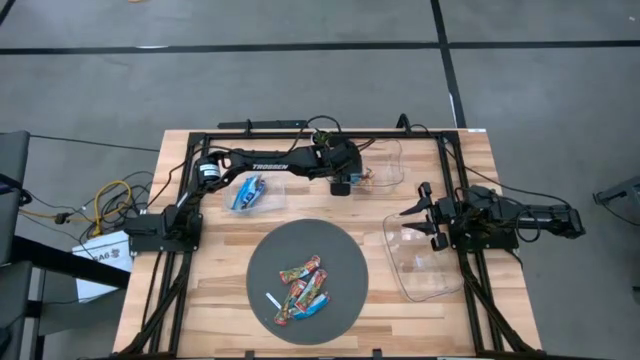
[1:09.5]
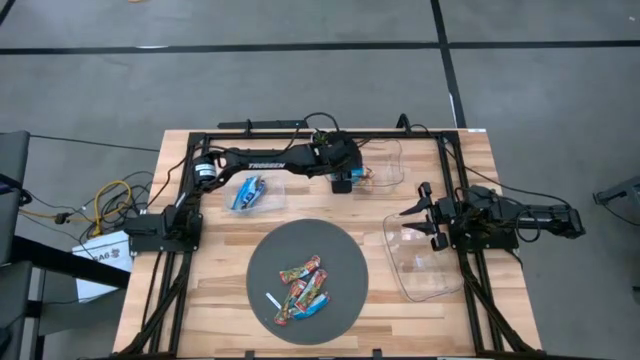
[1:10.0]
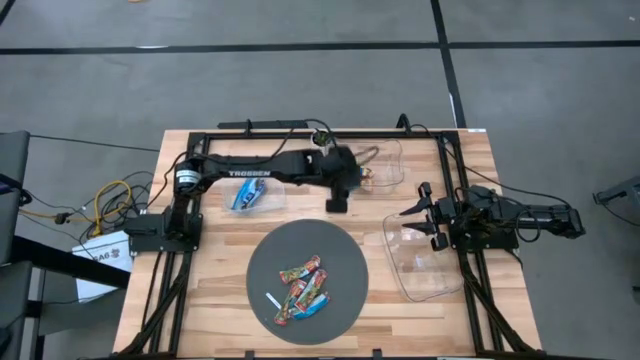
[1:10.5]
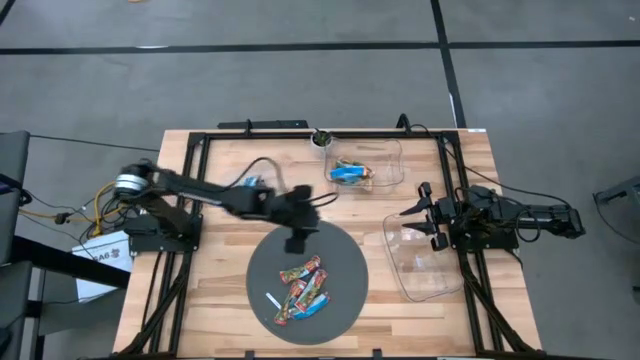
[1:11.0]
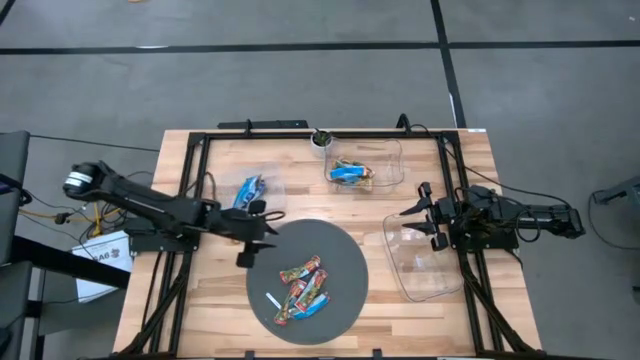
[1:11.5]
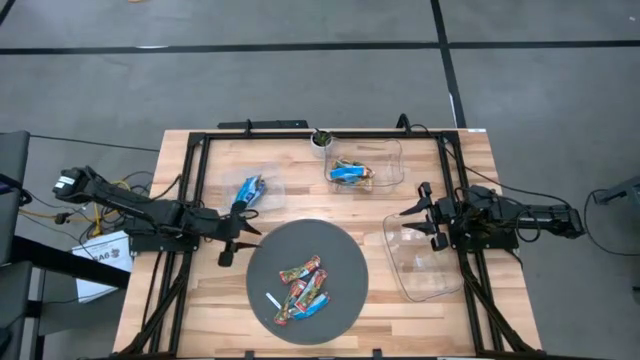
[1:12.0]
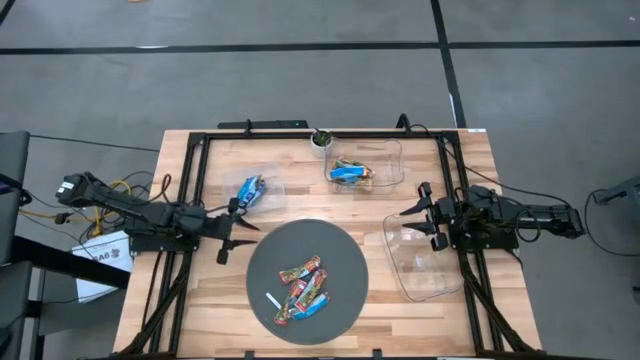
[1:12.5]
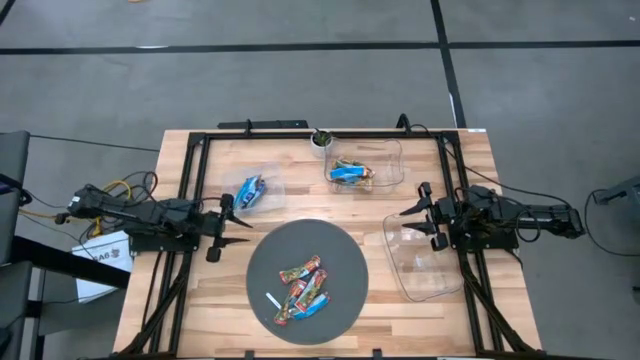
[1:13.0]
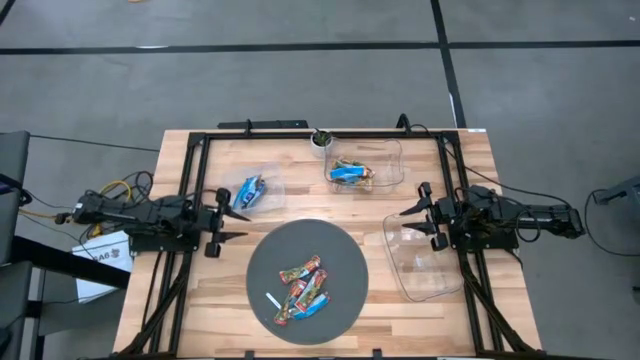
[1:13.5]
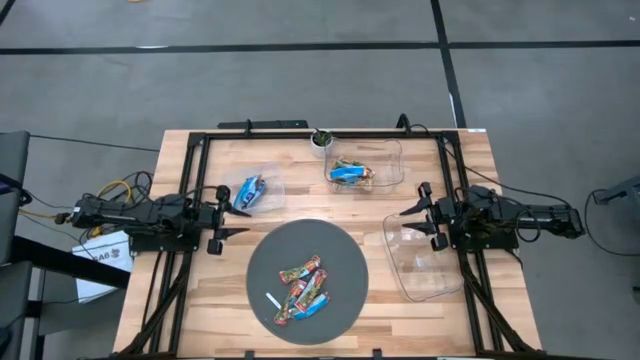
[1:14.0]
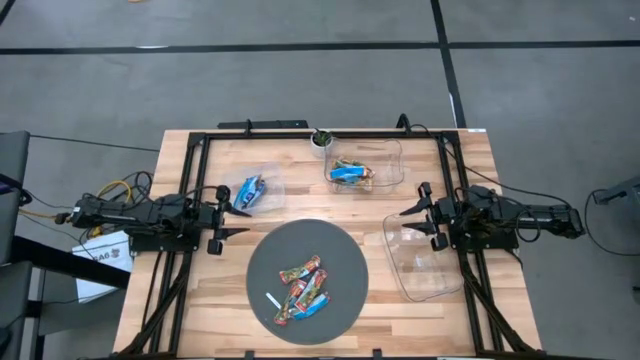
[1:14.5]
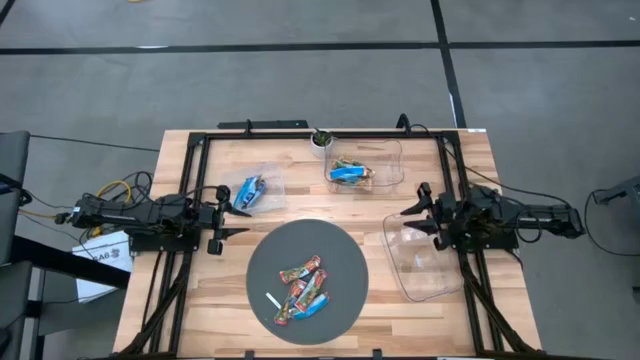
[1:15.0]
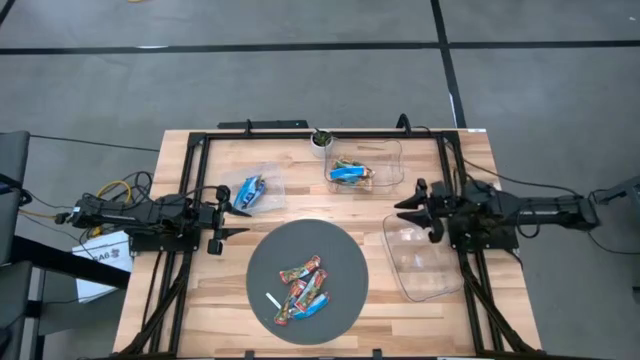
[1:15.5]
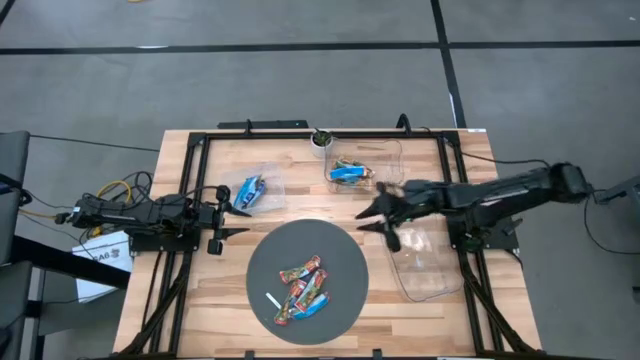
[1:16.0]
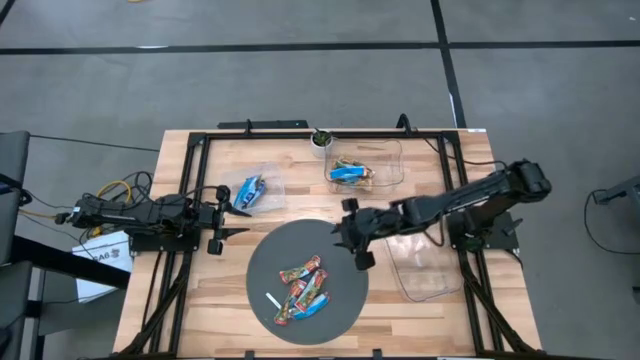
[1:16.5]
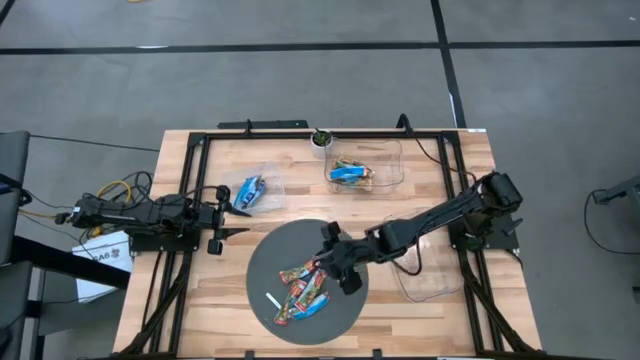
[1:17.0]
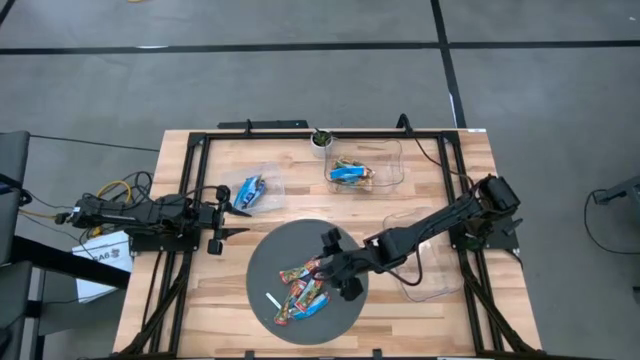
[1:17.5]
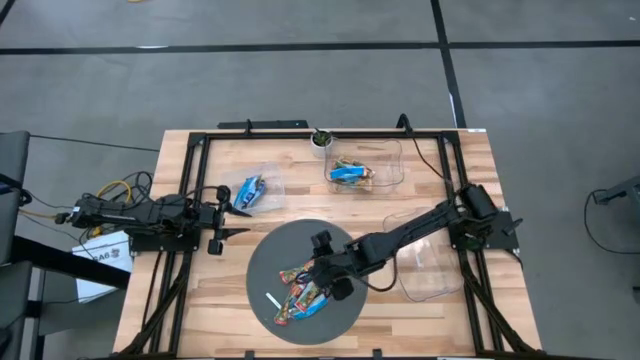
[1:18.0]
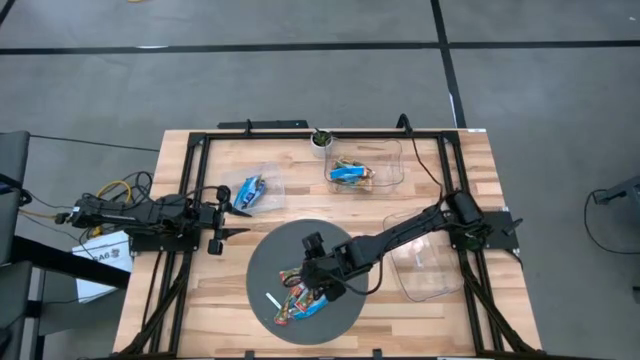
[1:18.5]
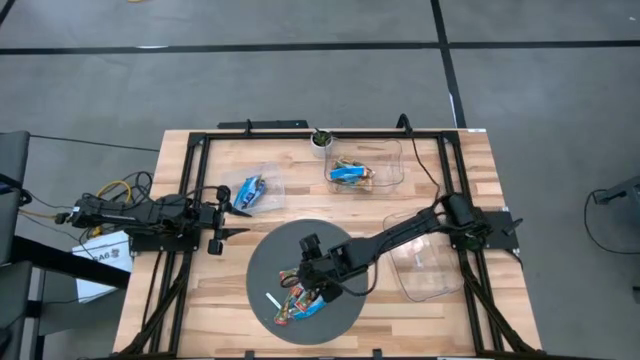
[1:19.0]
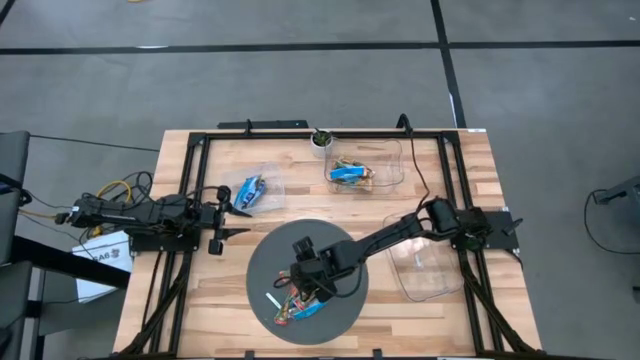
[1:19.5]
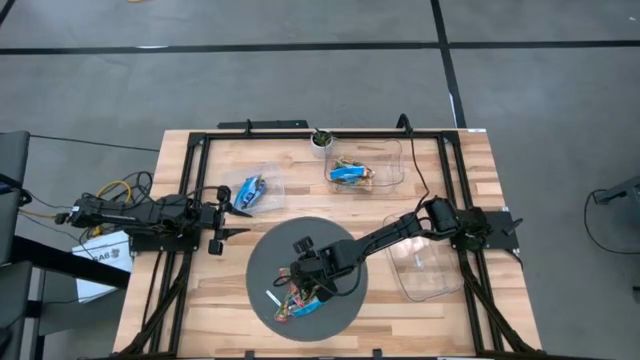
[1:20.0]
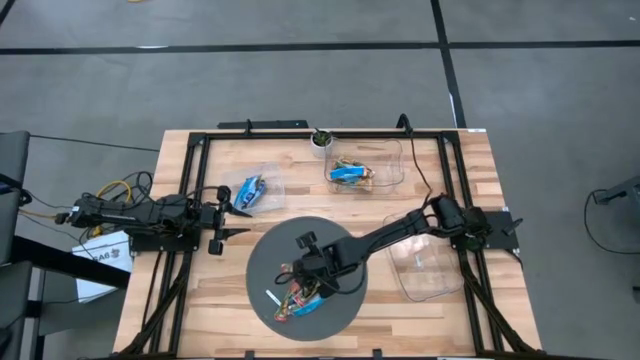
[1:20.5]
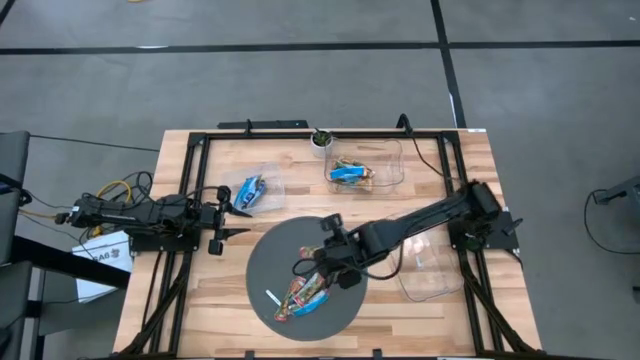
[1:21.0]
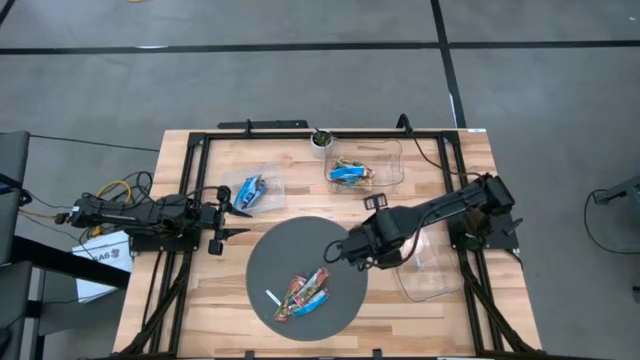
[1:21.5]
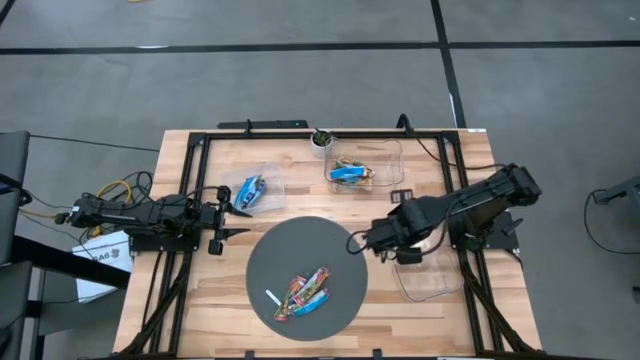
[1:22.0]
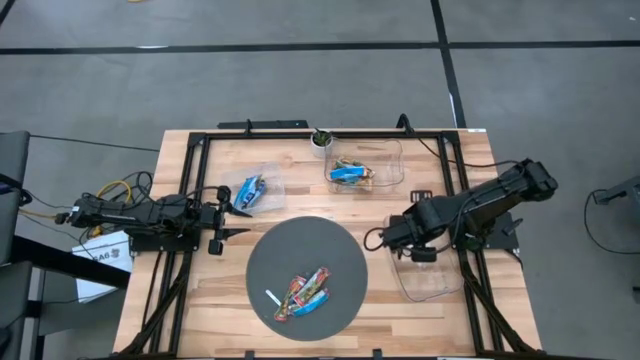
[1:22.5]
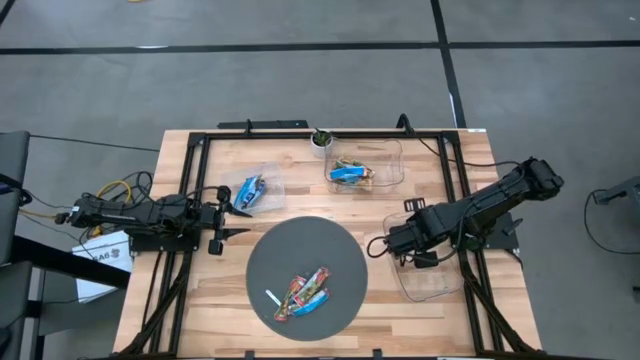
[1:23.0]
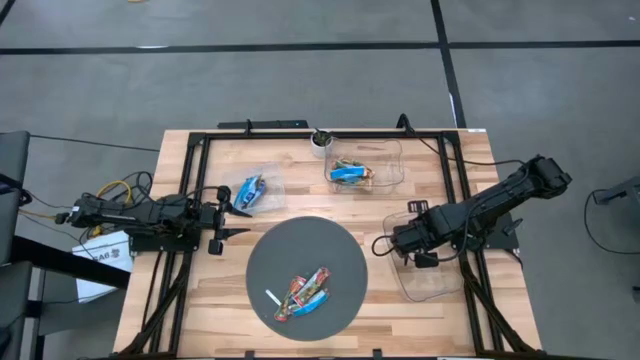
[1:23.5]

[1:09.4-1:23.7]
Task: Pick and place Granola Bars by type
Put the red granola bar into the bottom transparent bin

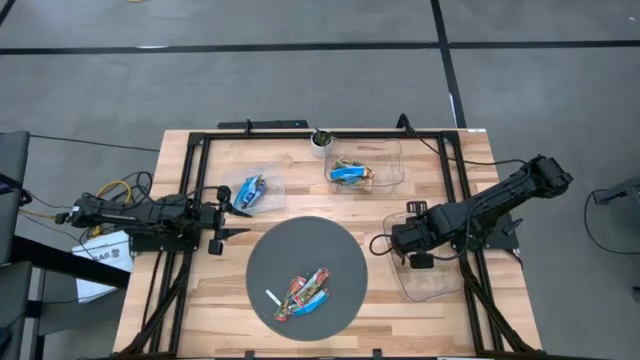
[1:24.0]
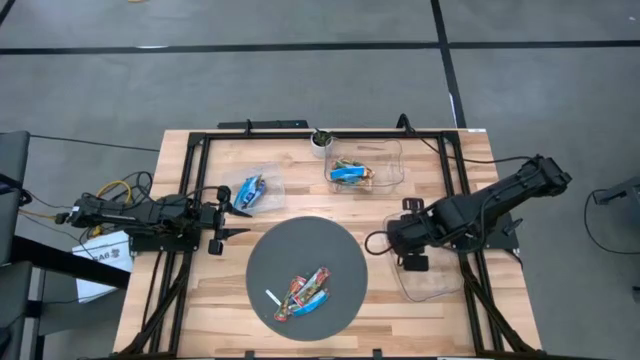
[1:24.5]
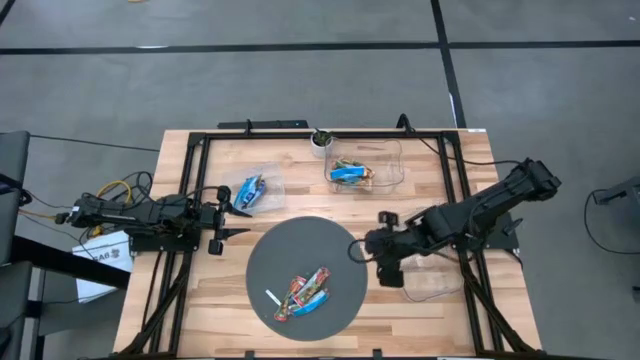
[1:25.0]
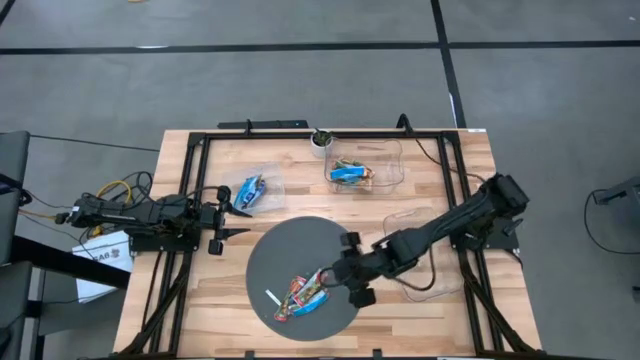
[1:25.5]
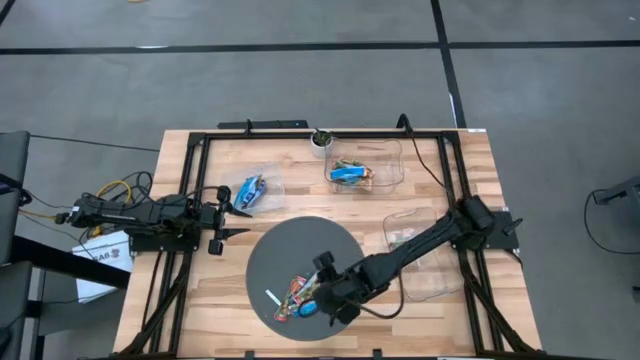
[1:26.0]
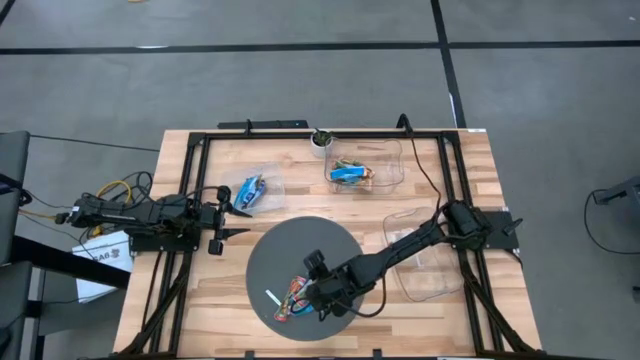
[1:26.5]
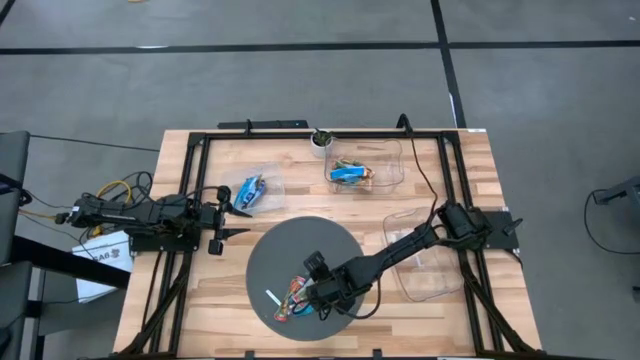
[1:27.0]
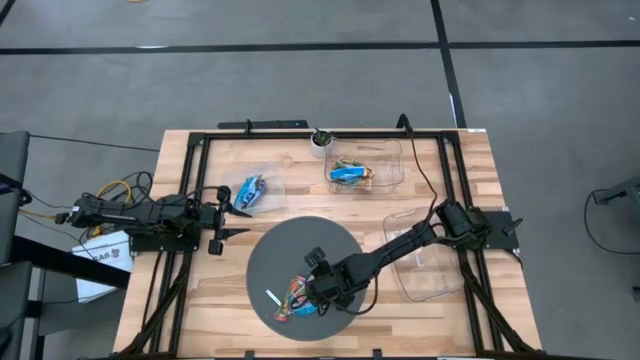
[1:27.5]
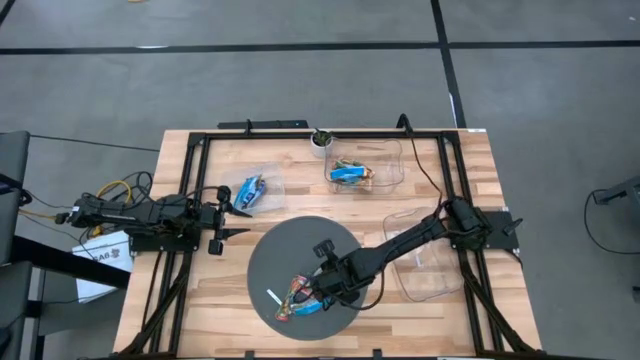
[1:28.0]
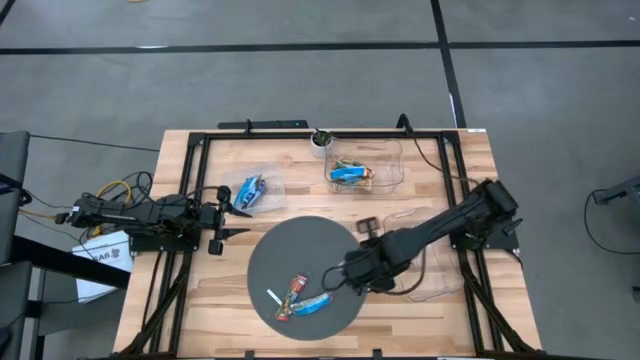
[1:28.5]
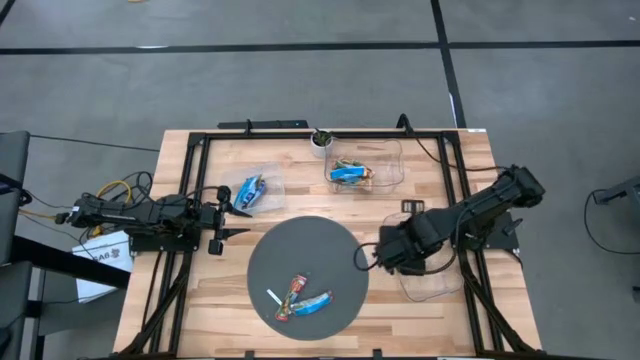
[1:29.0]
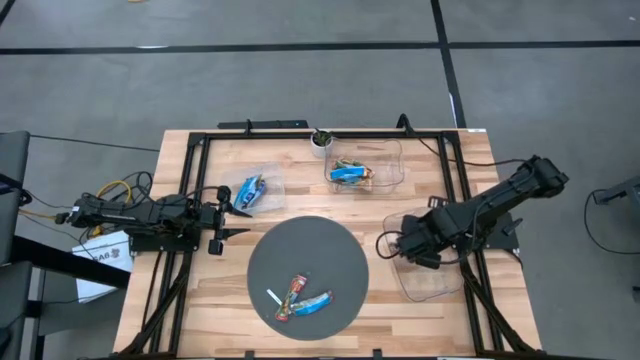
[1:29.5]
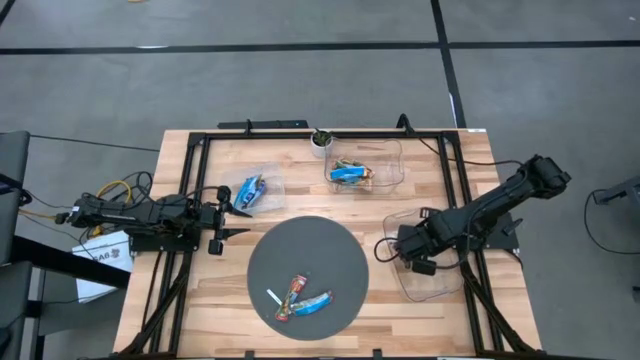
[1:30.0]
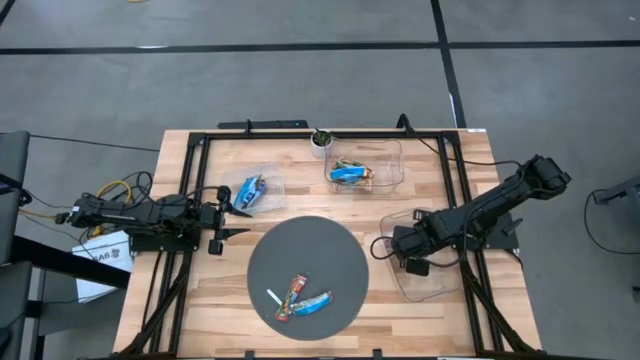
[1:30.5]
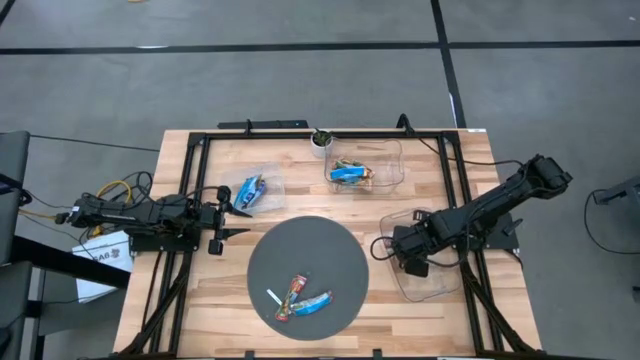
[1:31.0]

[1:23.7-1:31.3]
Put the red granola bar into the bottom transparent bin
